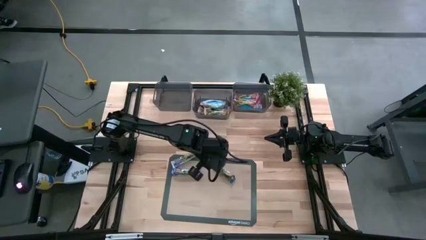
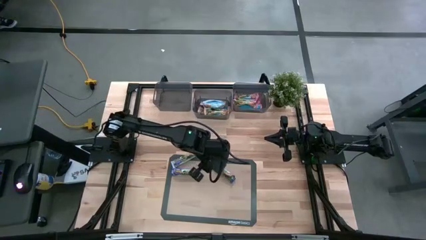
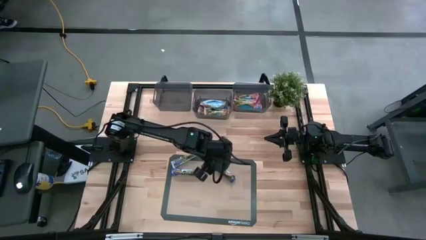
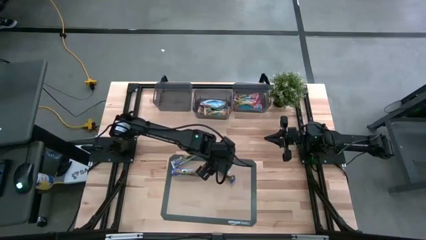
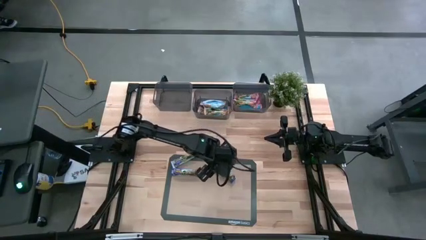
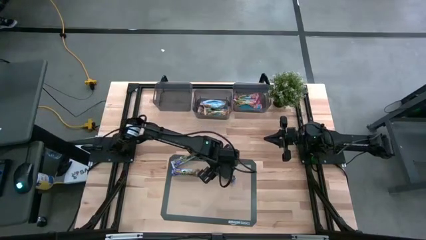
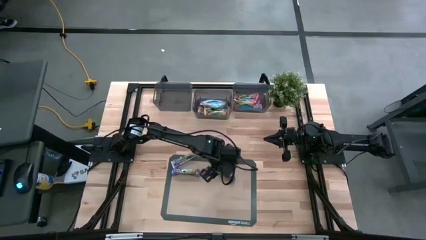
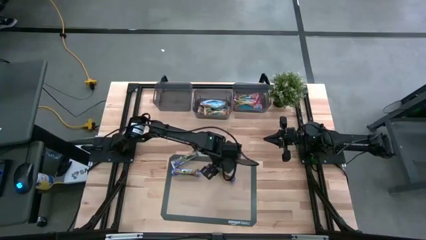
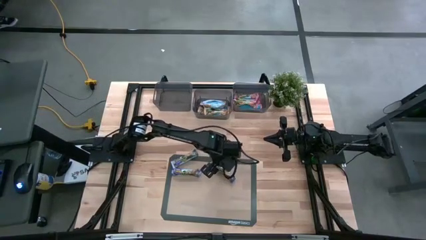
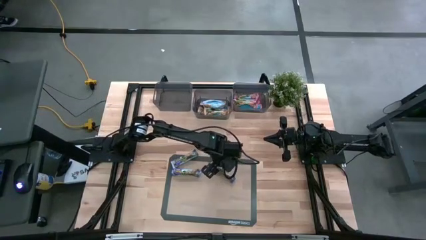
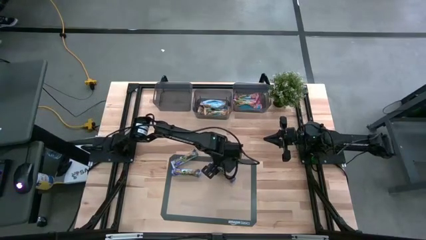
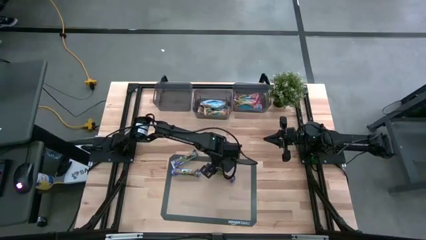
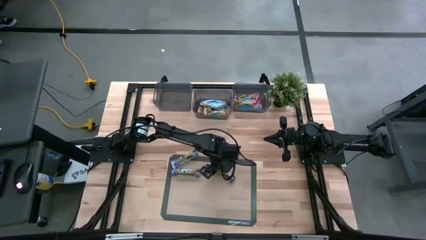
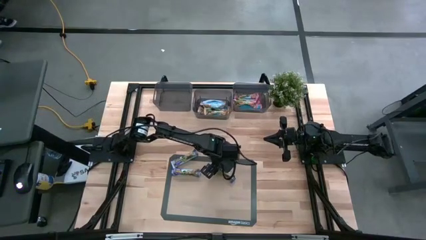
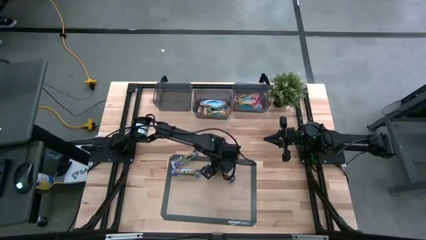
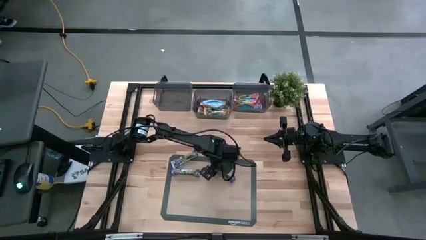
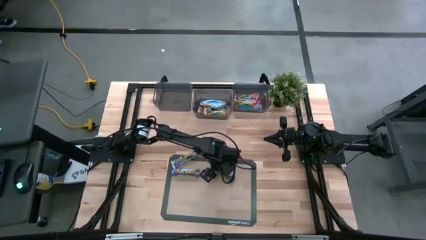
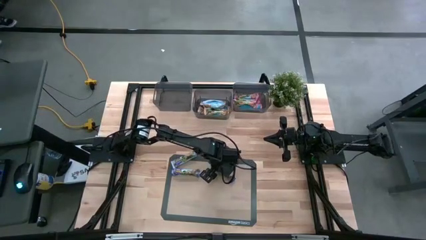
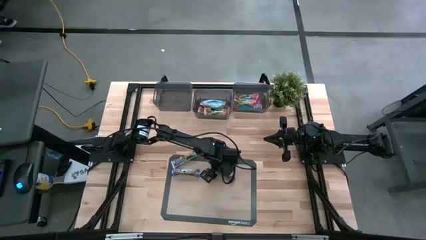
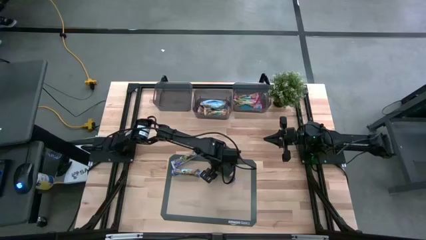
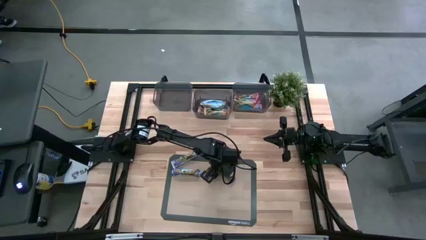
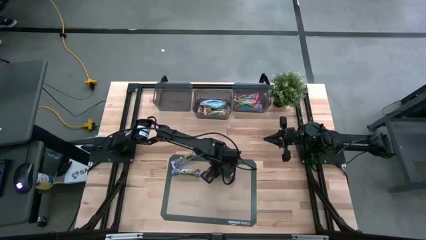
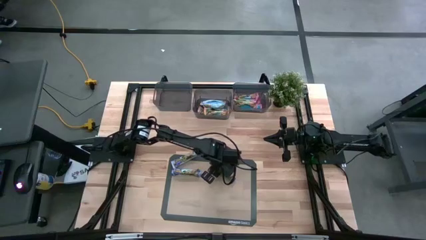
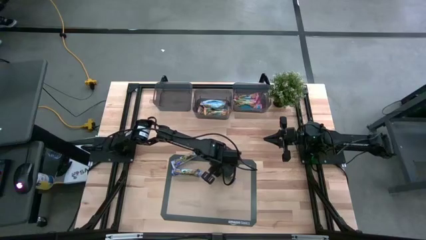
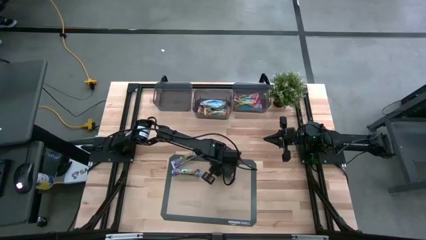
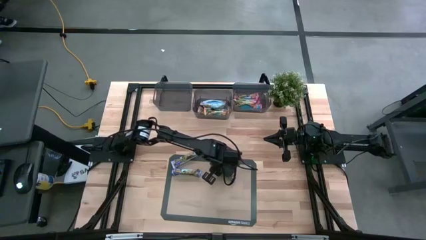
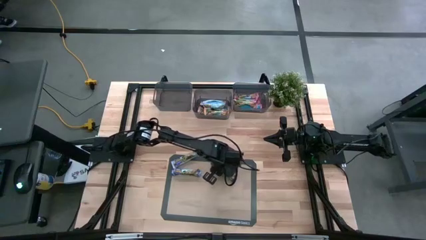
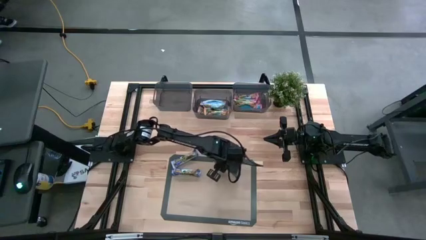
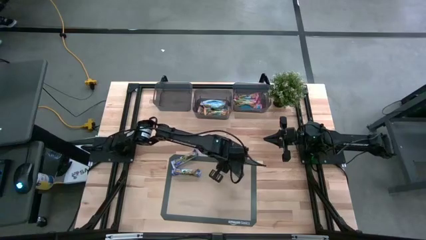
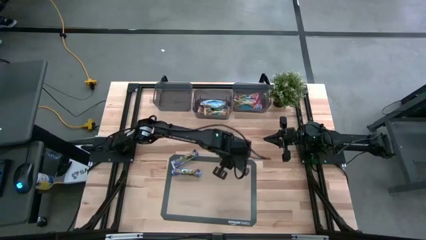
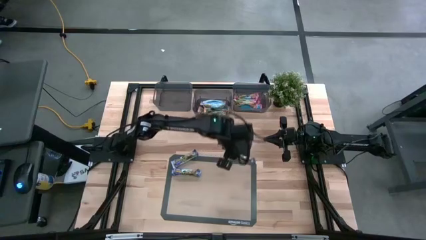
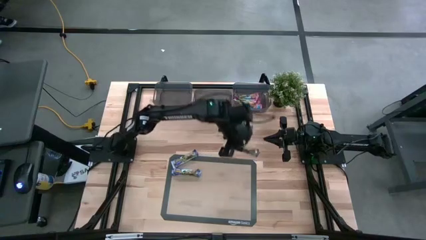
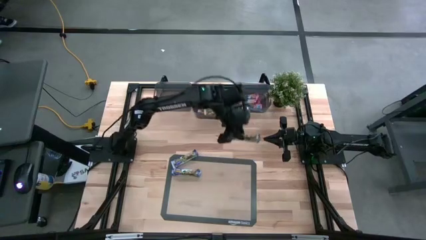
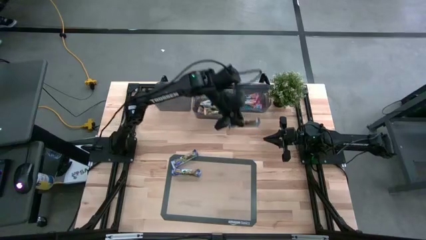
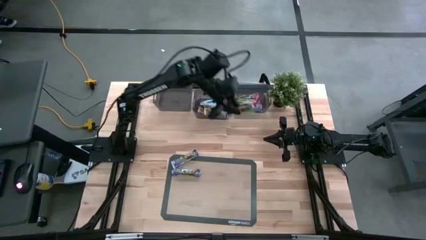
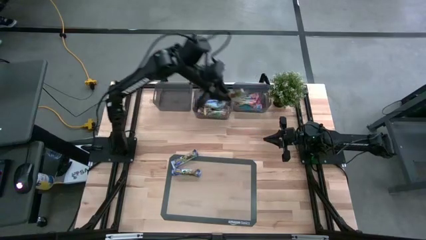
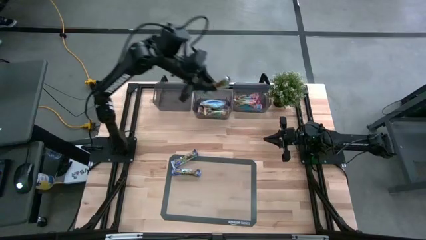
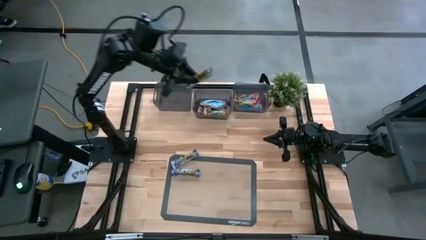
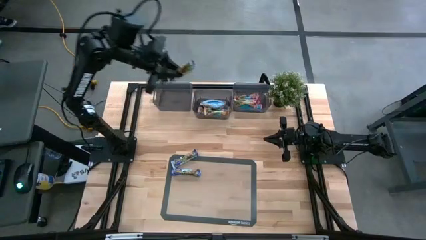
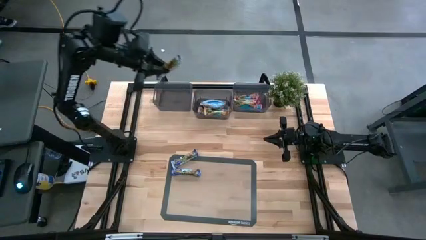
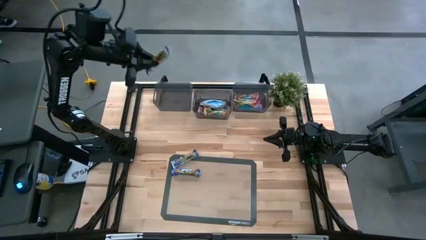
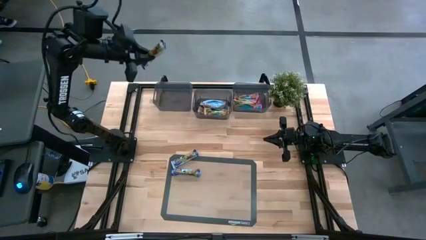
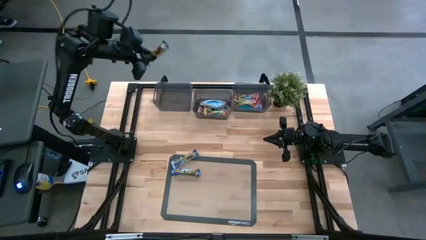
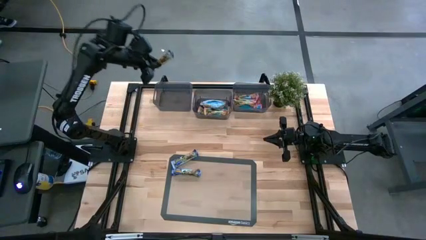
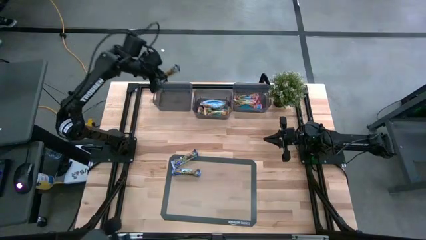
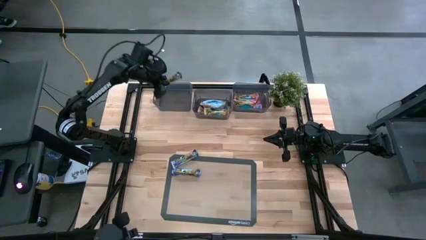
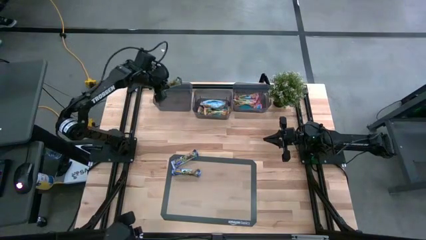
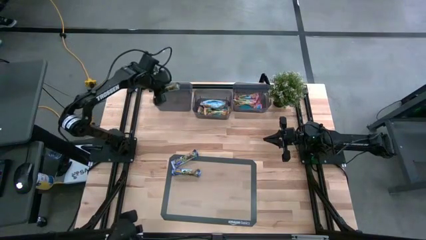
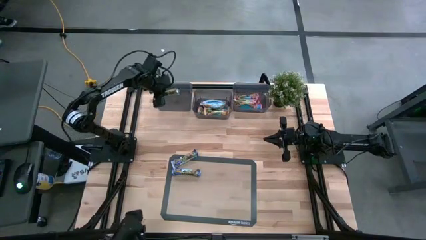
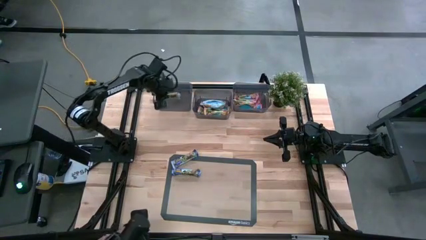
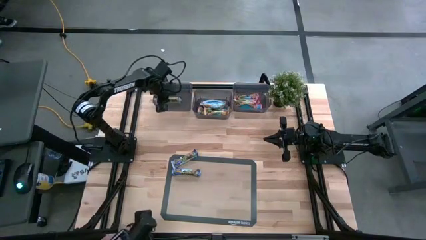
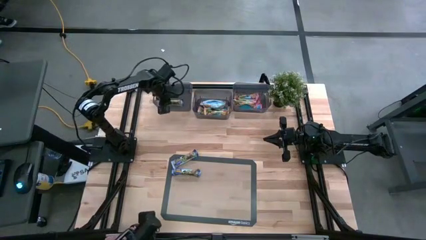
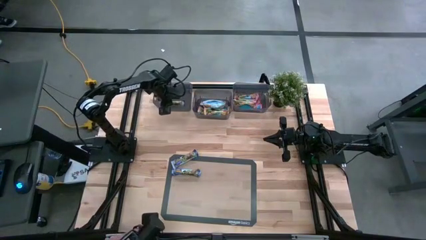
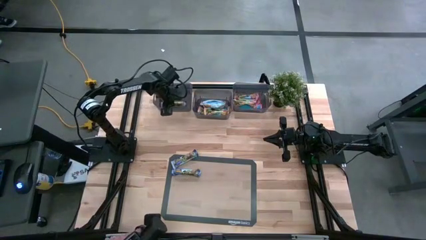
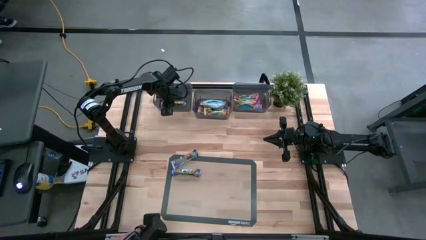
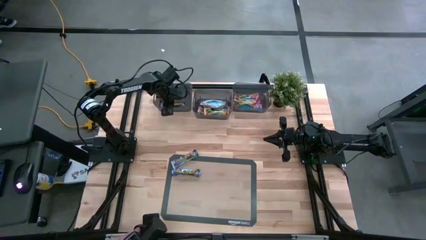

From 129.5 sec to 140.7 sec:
Task: Pick and place Granola Bars by type
Put the right blue granola bar into the left black bin

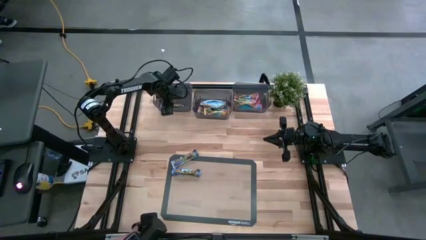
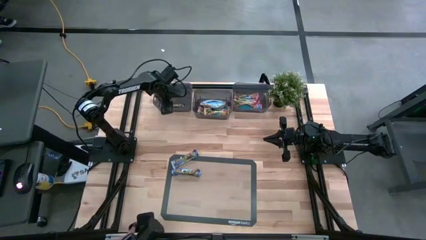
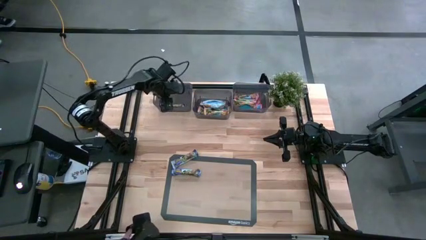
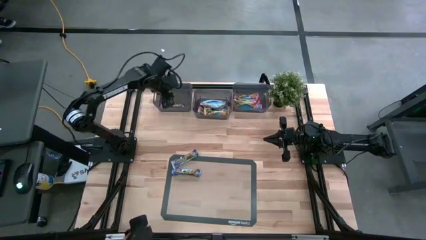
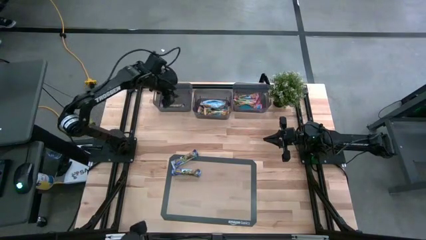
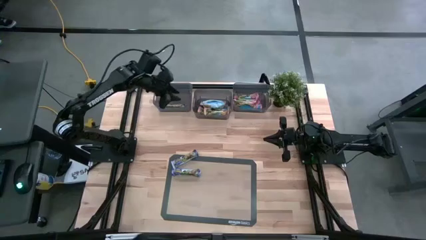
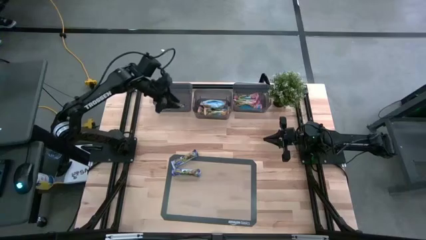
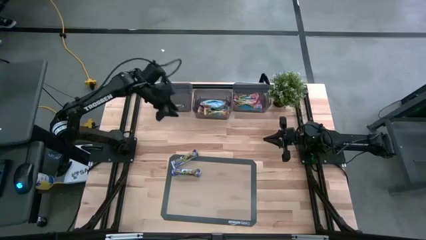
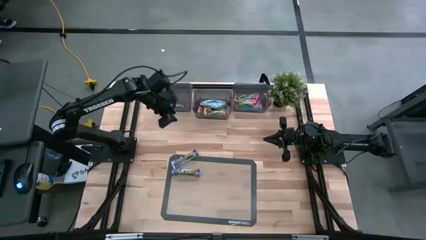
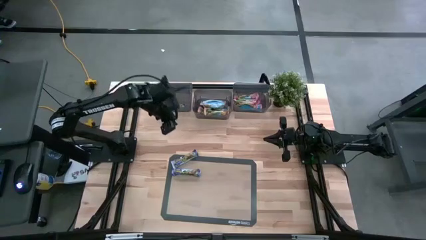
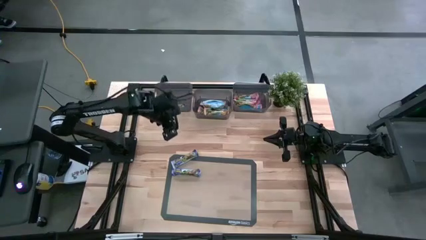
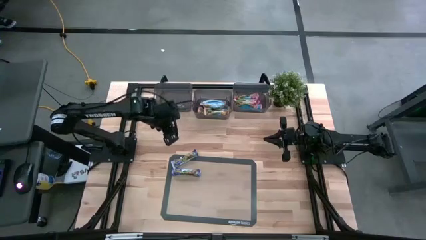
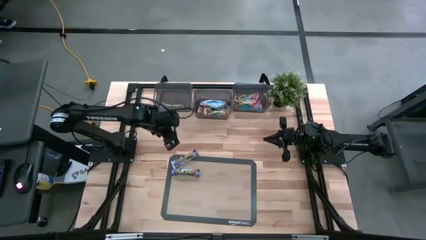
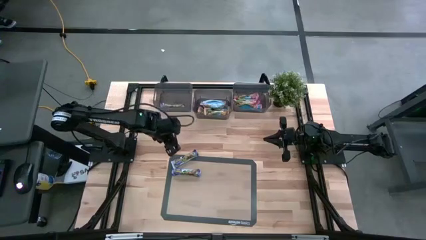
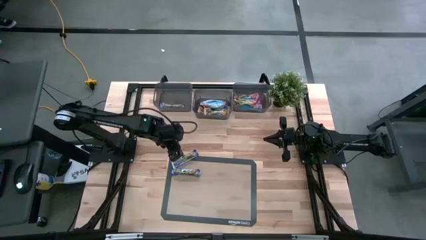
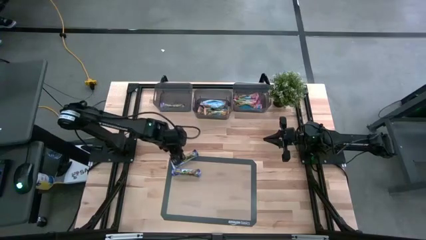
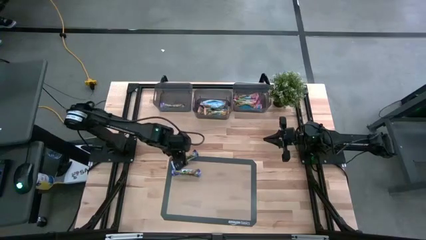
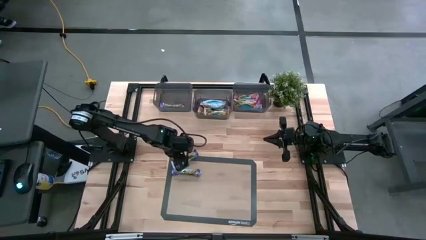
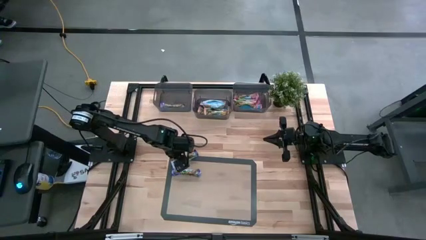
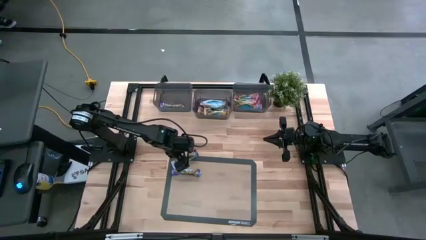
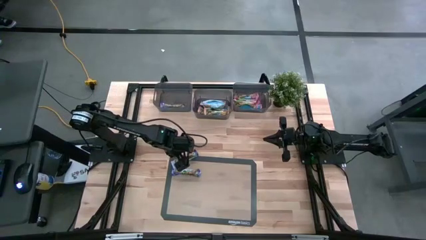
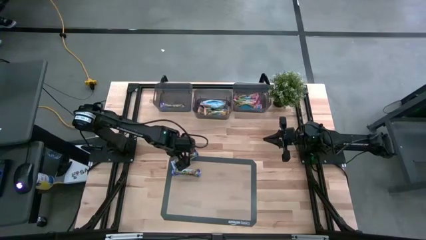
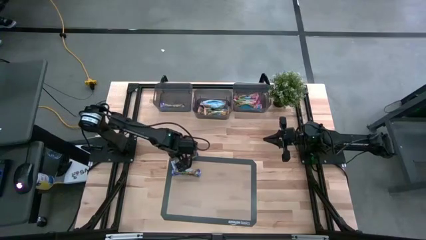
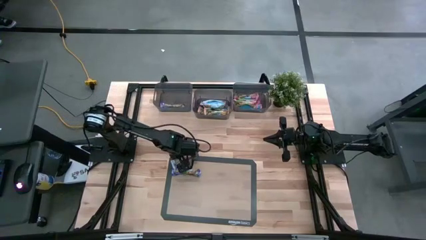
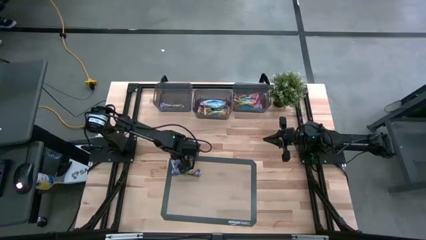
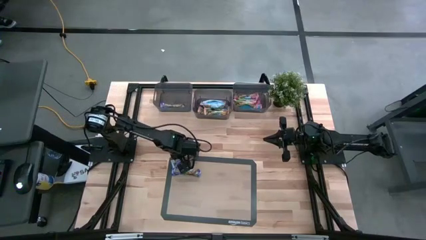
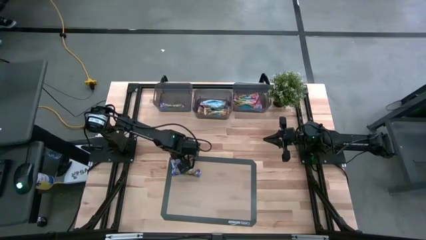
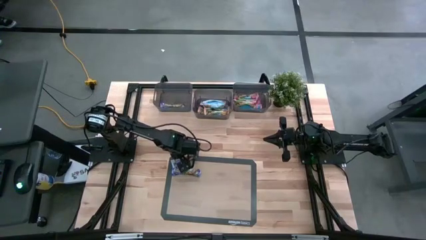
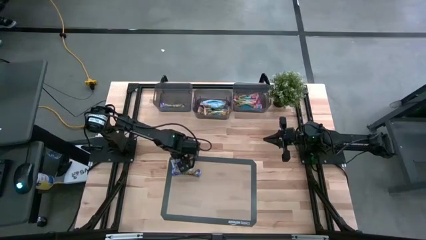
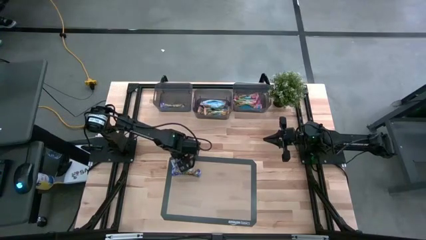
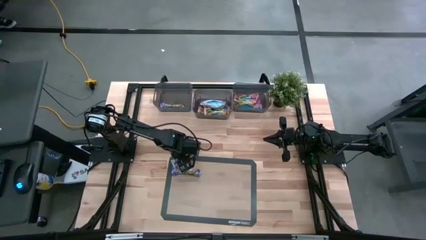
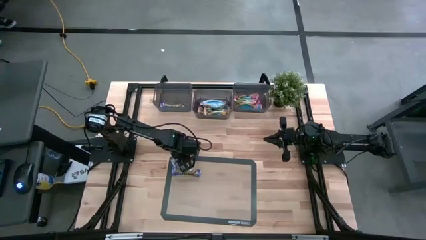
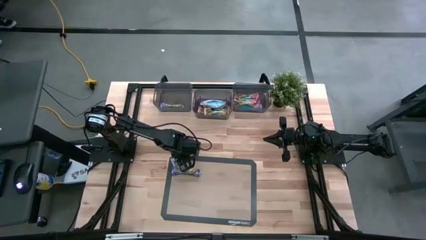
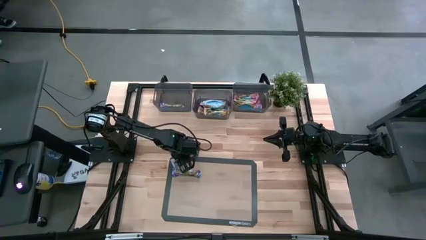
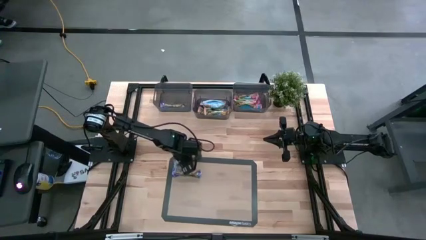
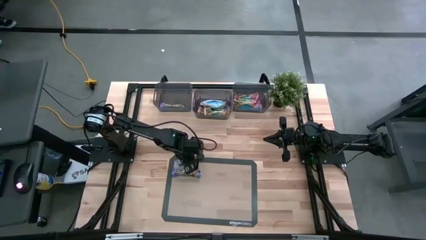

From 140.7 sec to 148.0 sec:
Put the top blue granola bar into the left black bin
